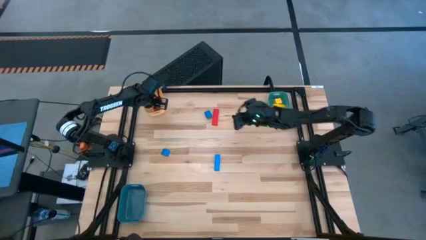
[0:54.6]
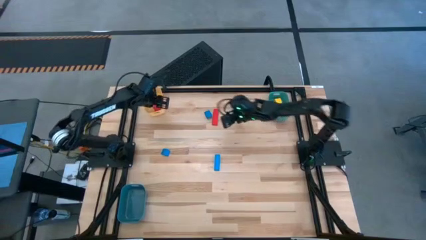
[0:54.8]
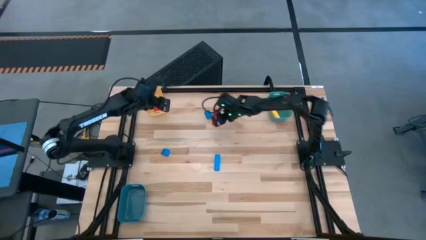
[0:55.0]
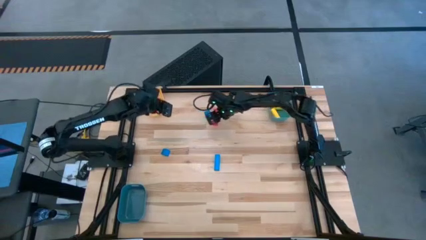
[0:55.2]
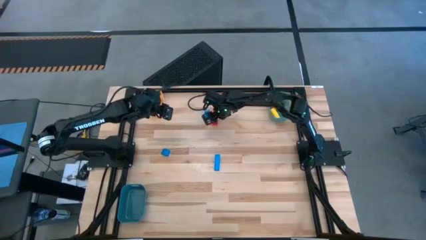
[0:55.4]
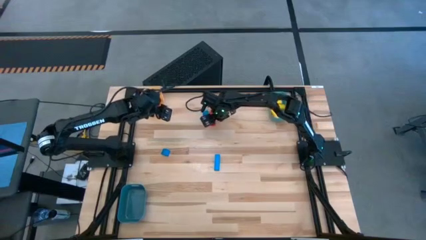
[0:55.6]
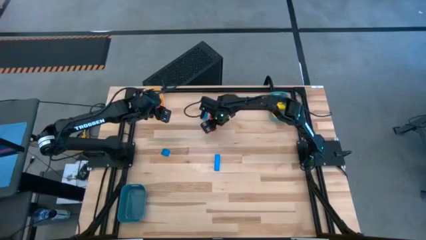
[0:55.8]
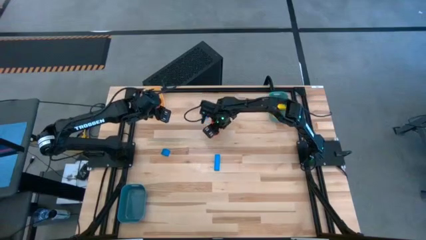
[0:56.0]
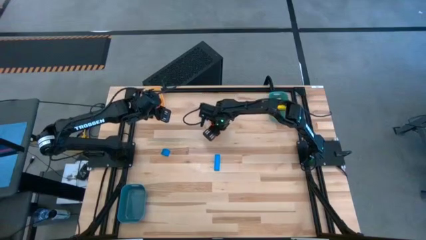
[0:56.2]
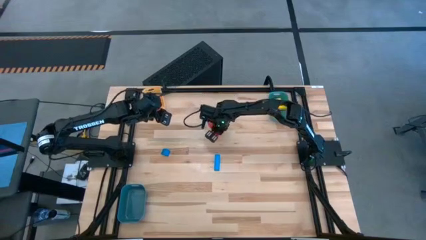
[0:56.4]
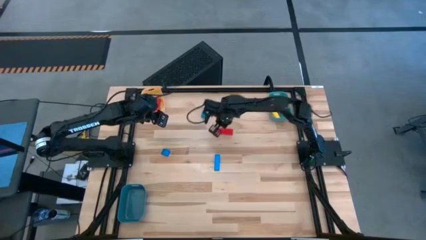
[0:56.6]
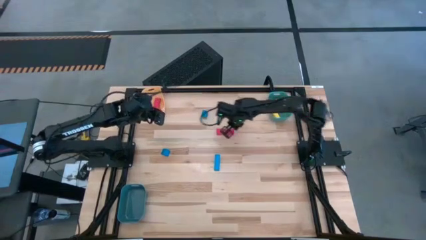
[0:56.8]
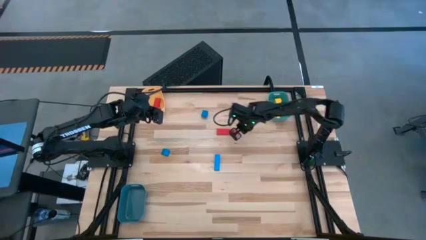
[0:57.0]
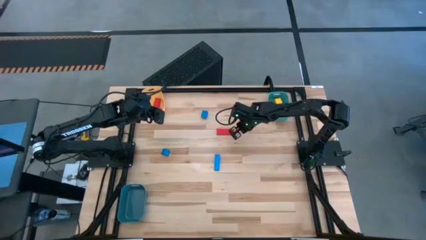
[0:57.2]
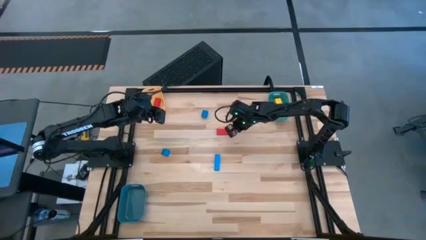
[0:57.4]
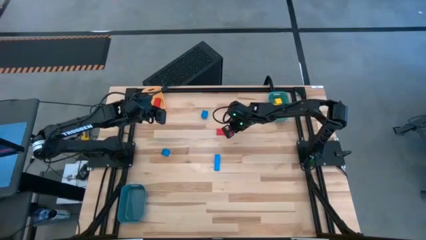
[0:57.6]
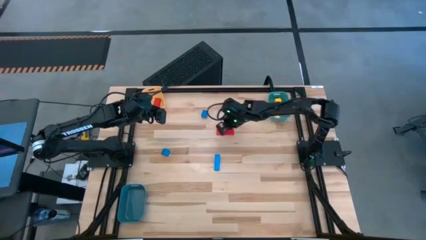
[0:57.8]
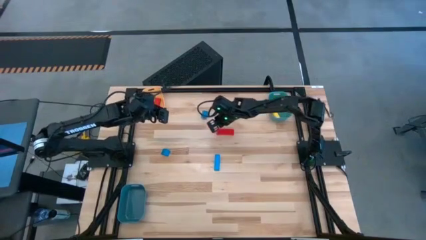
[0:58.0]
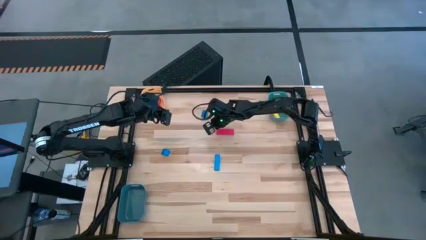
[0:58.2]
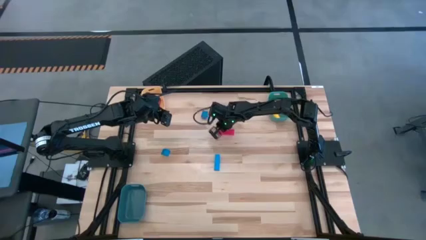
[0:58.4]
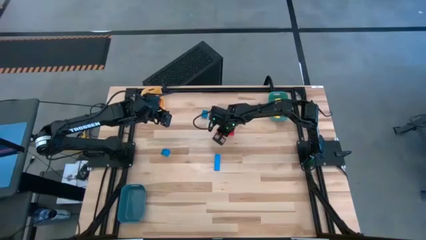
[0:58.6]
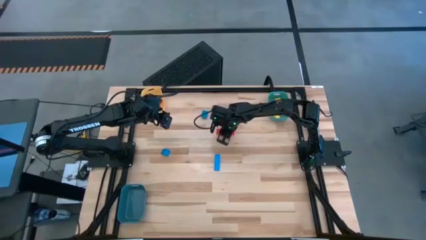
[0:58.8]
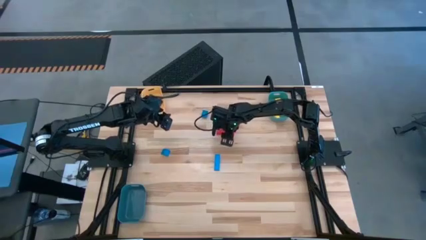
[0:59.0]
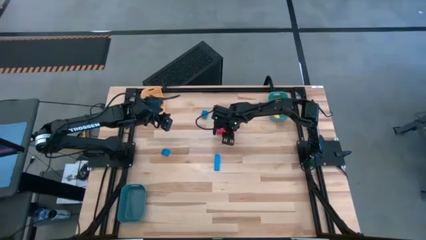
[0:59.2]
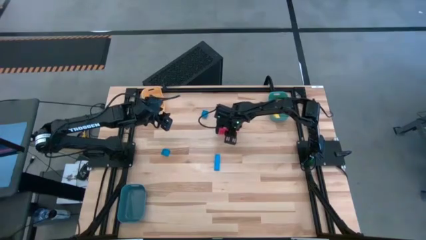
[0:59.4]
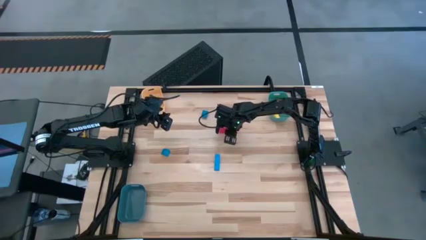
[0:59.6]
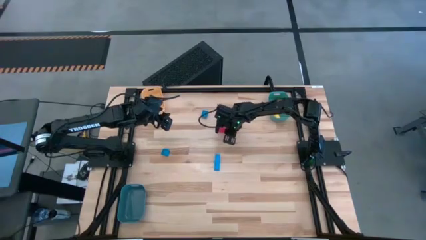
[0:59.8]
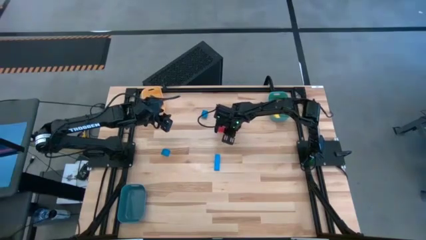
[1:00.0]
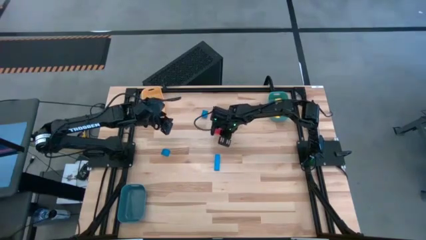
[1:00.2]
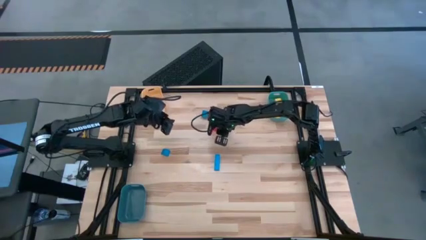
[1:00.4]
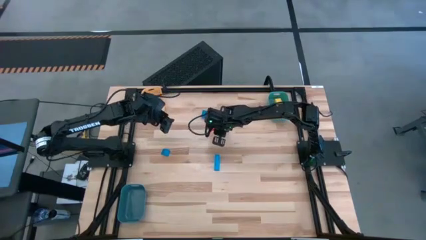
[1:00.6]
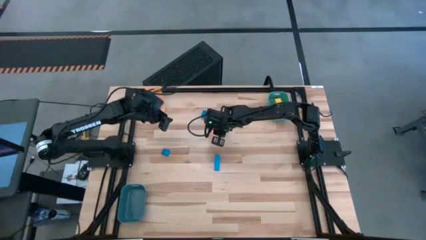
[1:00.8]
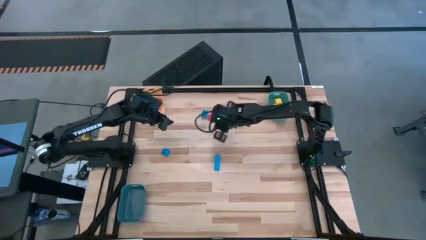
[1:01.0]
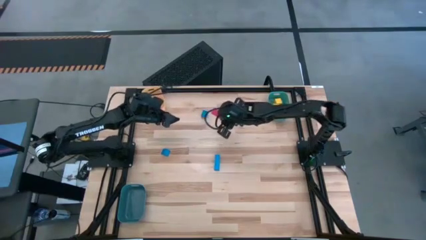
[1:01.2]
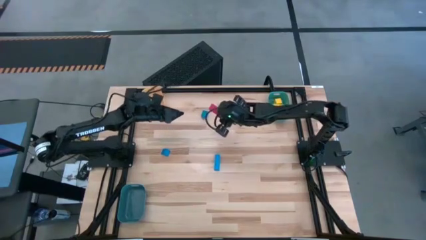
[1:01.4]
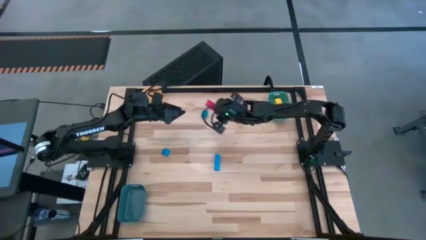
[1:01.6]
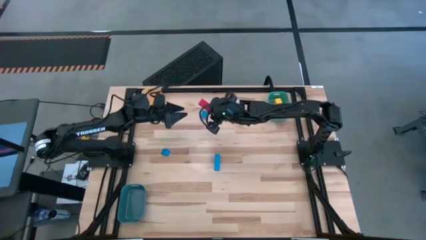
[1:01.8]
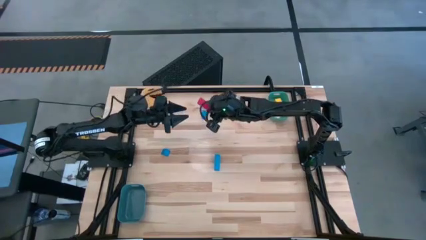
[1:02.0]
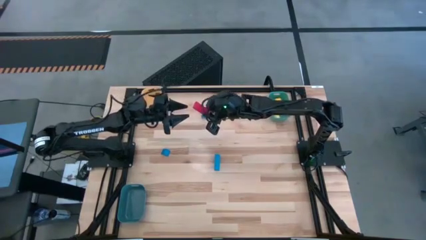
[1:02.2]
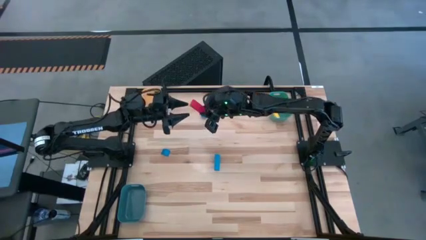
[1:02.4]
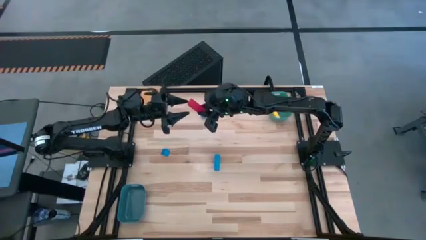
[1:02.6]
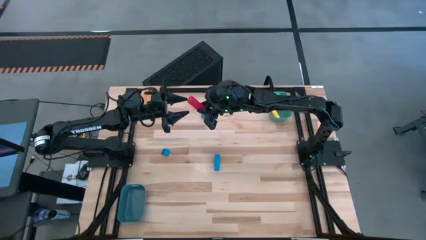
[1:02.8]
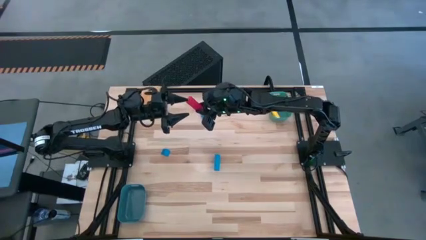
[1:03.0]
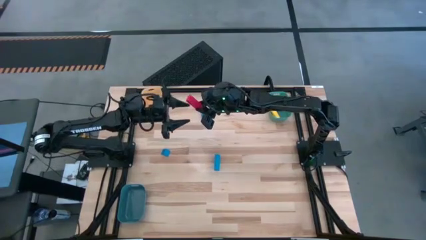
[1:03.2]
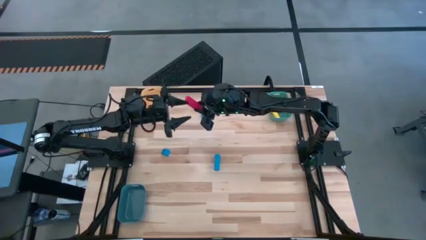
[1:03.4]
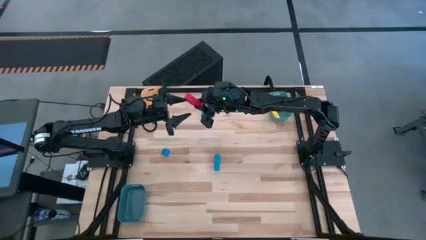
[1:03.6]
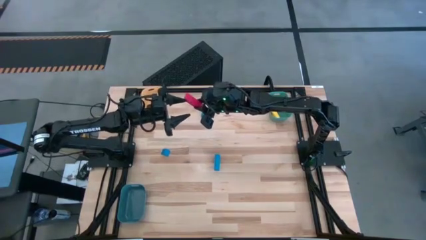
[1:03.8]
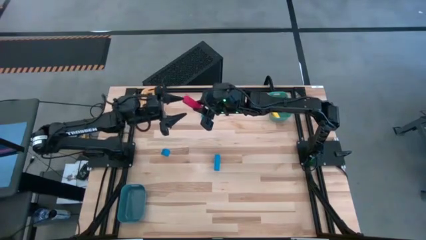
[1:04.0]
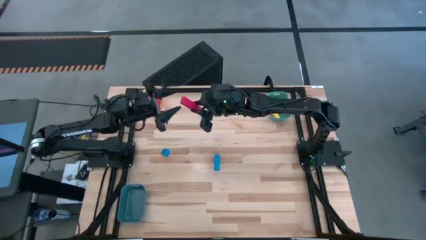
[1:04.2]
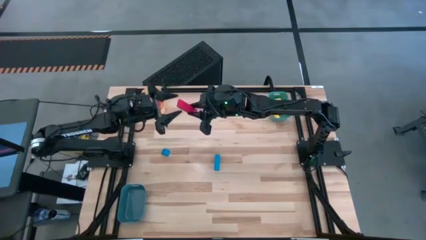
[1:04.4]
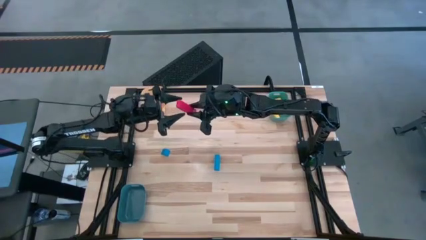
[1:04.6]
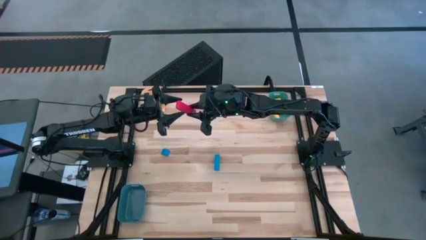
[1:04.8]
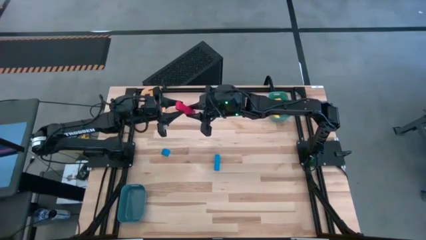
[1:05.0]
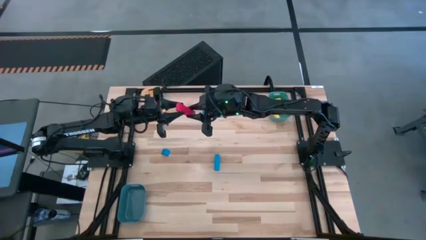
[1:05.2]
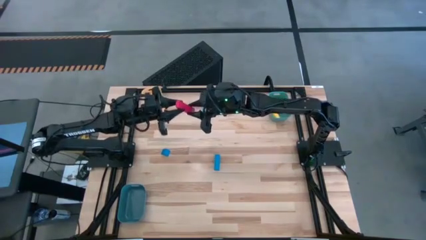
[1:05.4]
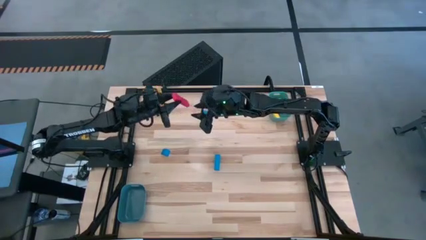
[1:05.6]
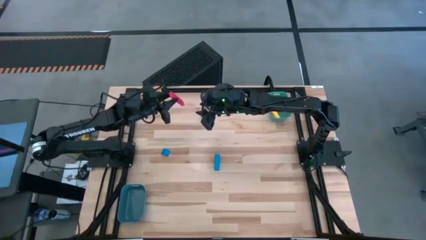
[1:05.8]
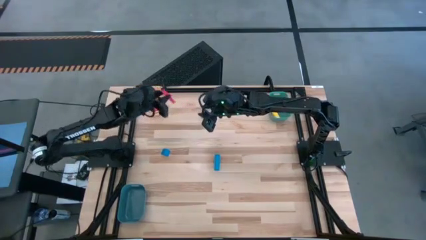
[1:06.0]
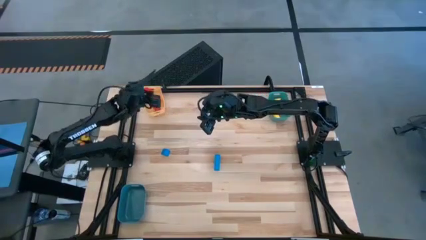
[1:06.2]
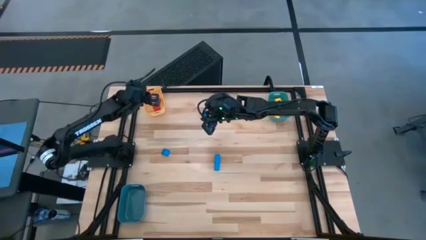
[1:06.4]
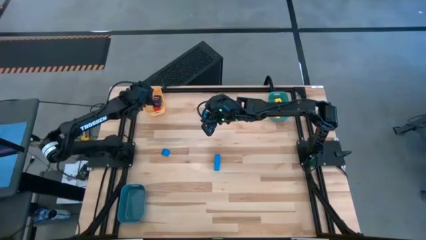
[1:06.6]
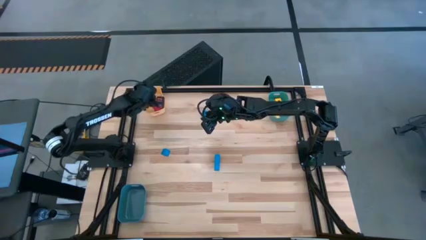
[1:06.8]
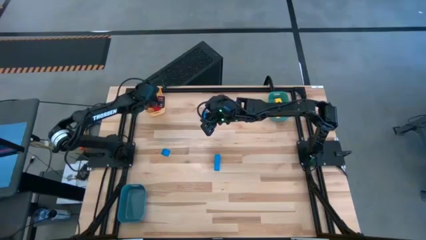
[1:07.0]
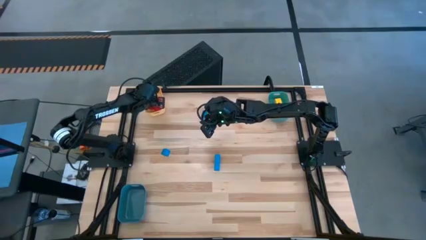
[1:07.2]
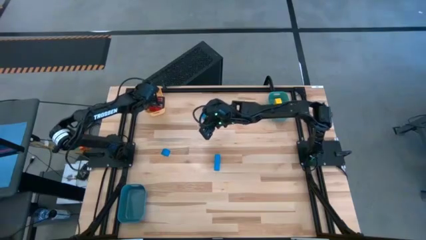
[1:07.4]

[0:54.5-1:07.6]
Task: Sort & place blocks by color
Put the red block into the orange bin
